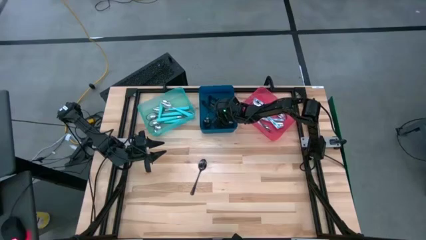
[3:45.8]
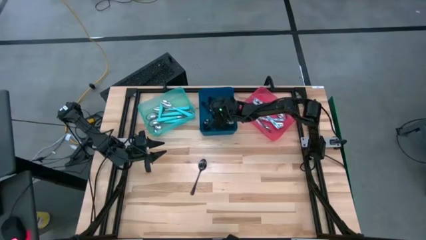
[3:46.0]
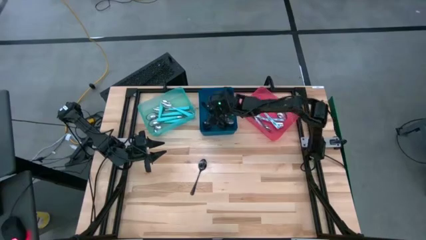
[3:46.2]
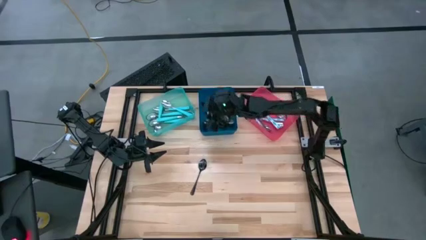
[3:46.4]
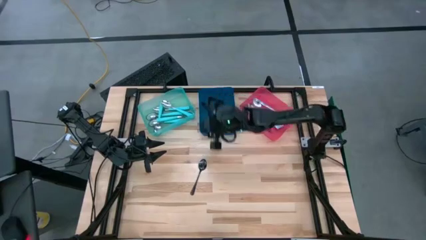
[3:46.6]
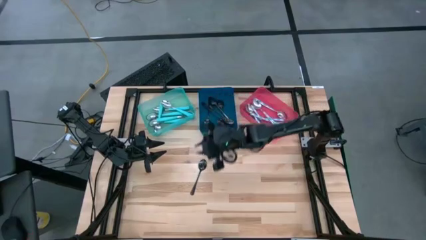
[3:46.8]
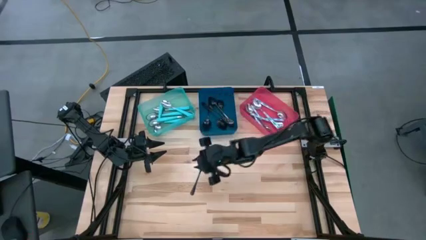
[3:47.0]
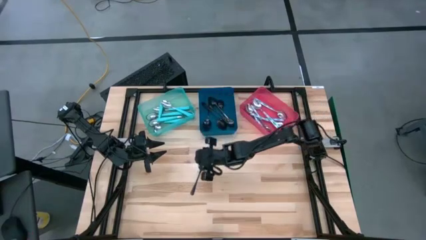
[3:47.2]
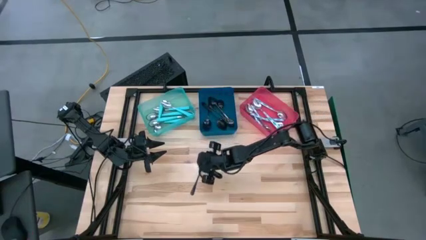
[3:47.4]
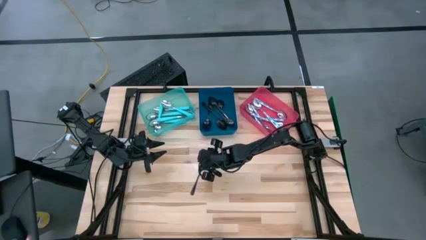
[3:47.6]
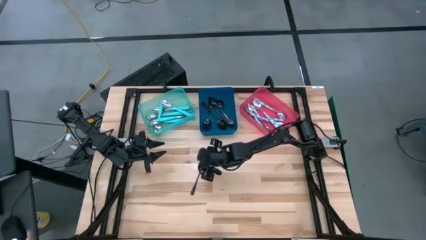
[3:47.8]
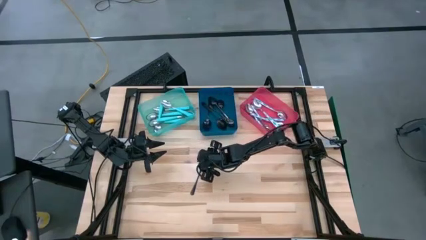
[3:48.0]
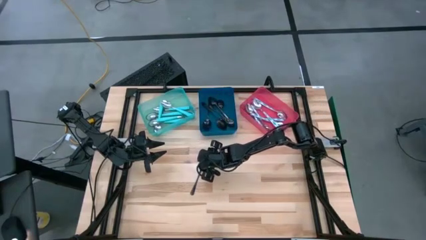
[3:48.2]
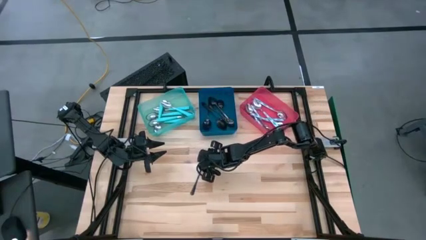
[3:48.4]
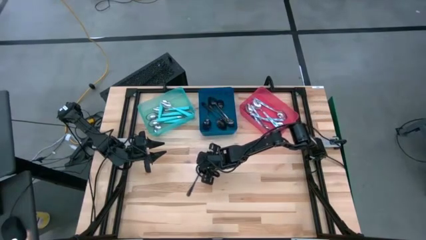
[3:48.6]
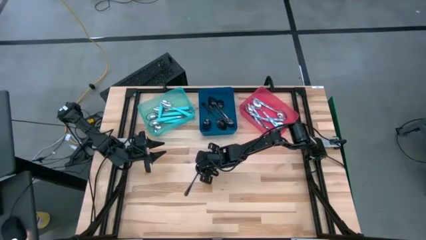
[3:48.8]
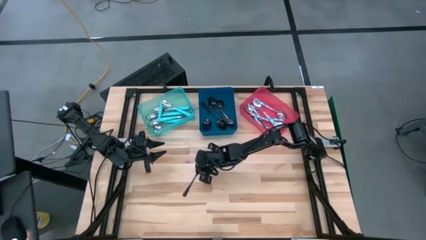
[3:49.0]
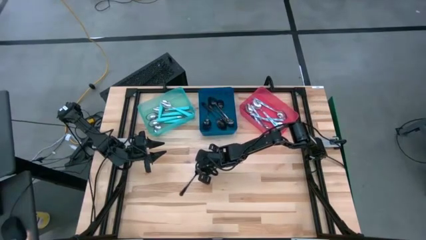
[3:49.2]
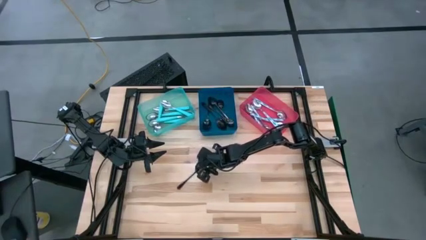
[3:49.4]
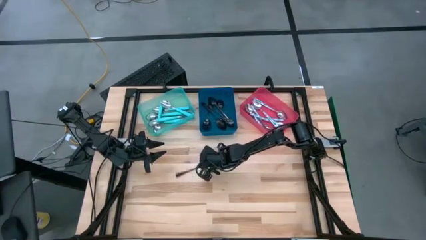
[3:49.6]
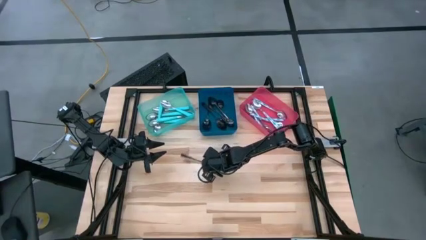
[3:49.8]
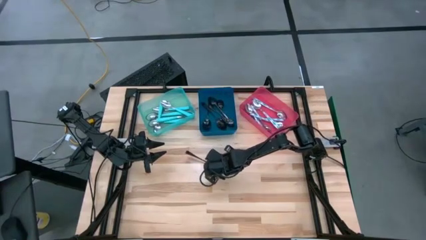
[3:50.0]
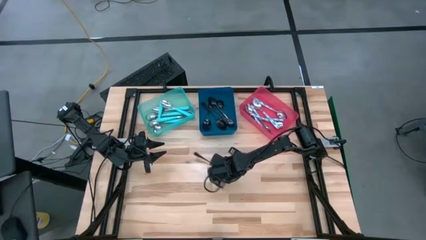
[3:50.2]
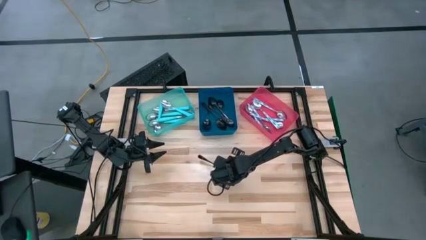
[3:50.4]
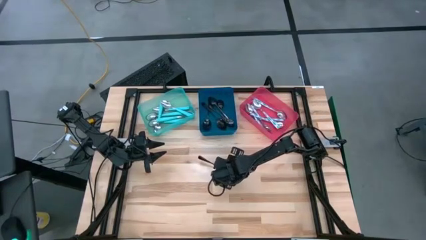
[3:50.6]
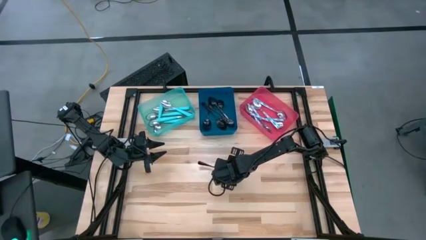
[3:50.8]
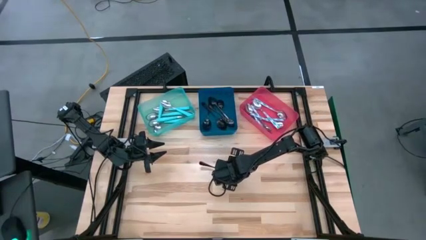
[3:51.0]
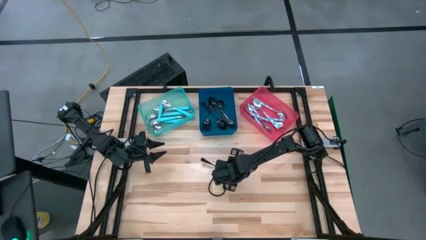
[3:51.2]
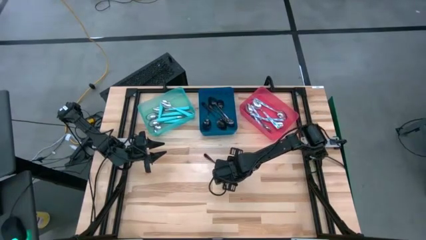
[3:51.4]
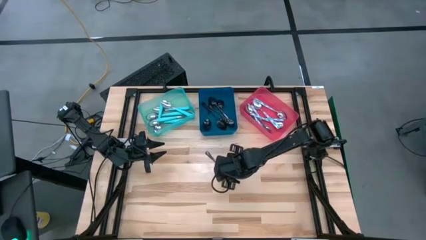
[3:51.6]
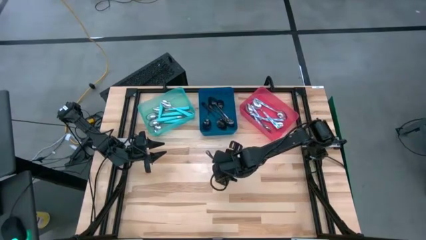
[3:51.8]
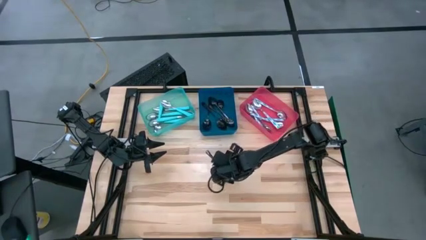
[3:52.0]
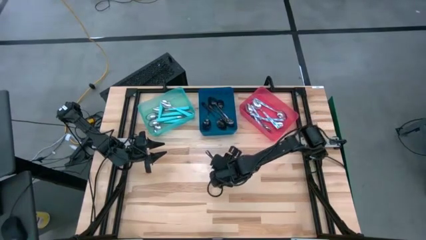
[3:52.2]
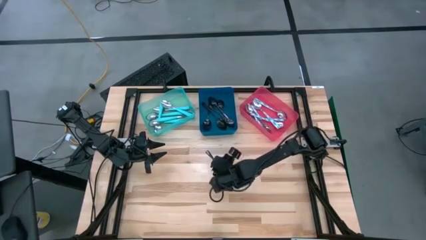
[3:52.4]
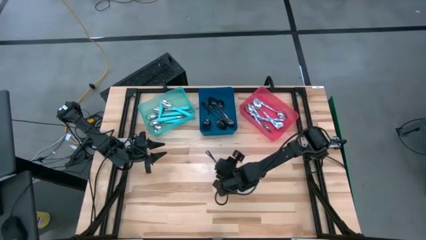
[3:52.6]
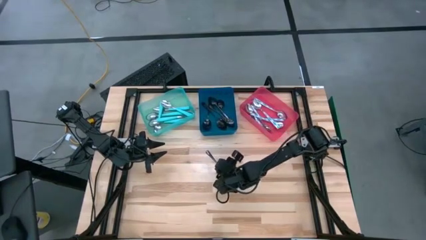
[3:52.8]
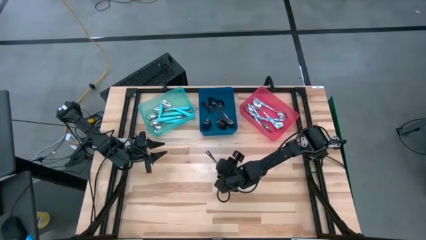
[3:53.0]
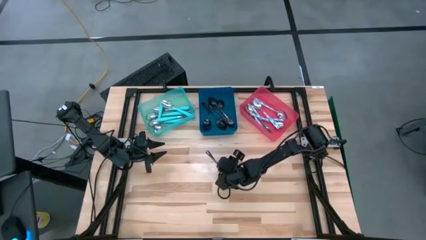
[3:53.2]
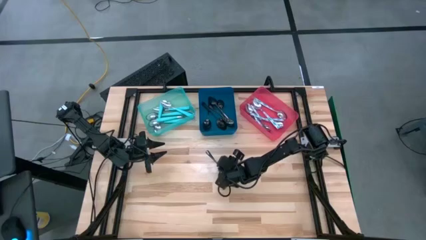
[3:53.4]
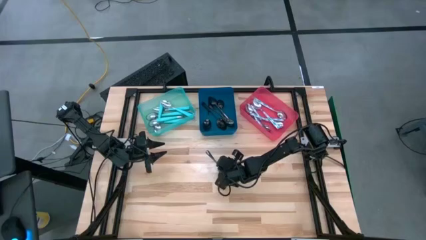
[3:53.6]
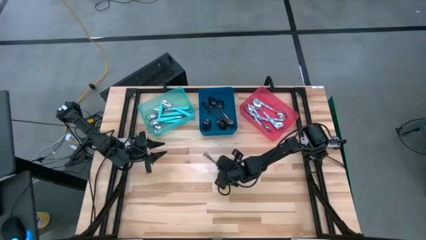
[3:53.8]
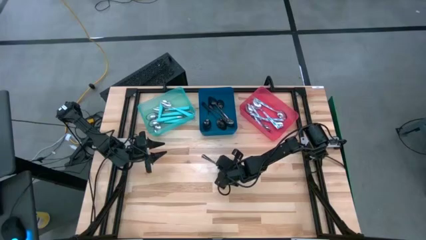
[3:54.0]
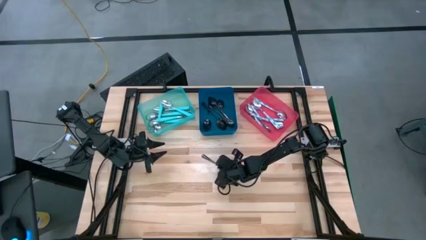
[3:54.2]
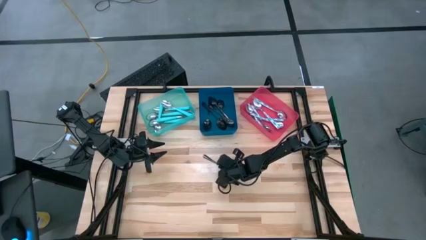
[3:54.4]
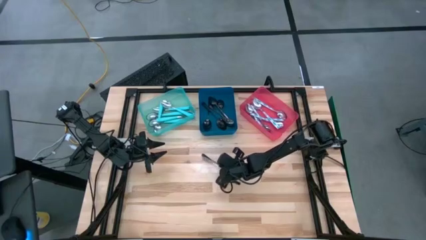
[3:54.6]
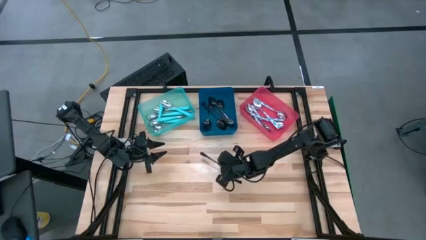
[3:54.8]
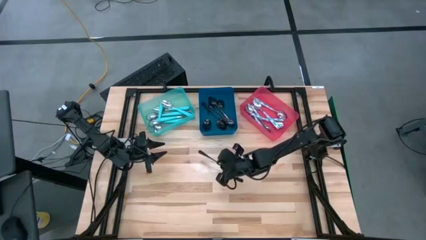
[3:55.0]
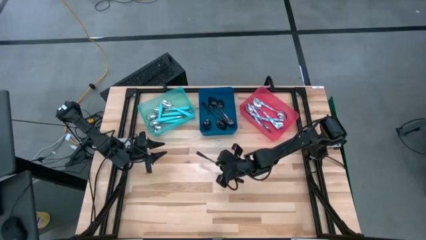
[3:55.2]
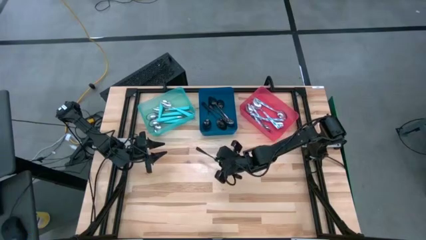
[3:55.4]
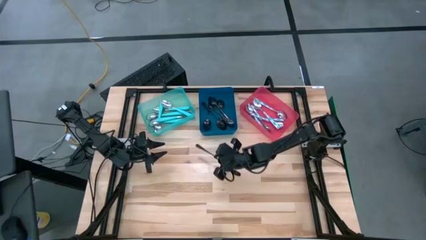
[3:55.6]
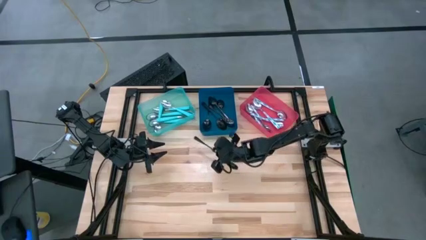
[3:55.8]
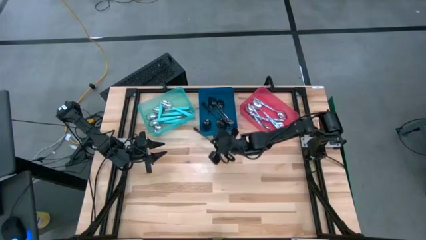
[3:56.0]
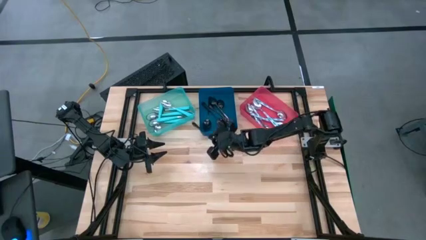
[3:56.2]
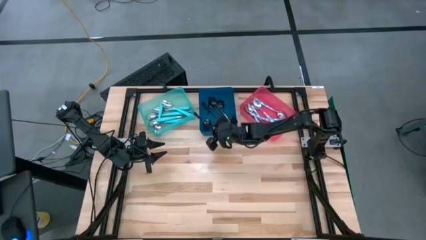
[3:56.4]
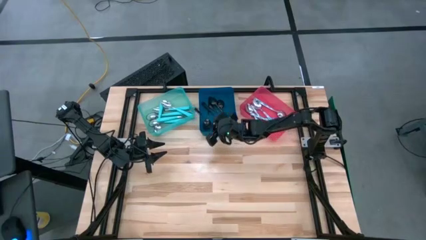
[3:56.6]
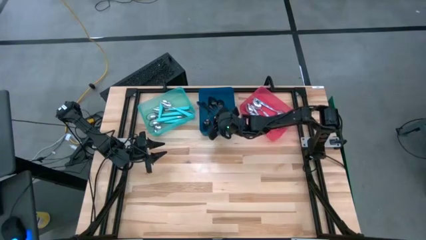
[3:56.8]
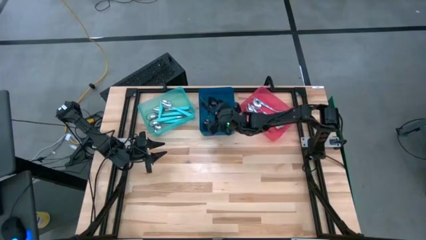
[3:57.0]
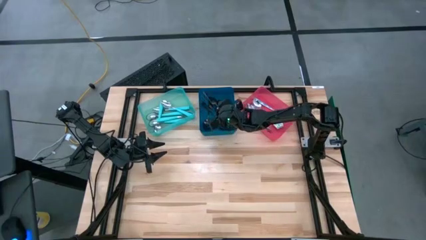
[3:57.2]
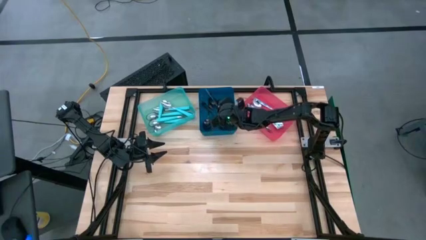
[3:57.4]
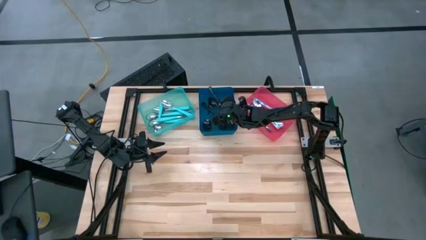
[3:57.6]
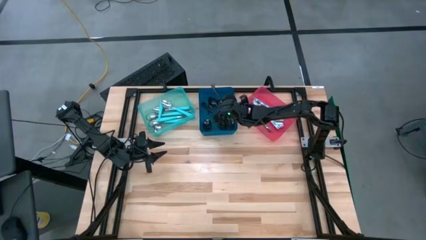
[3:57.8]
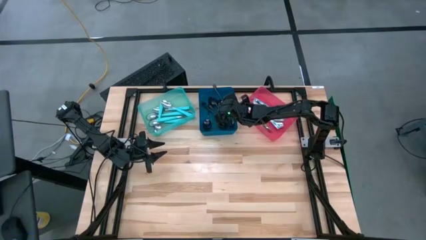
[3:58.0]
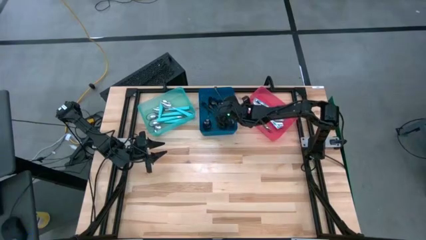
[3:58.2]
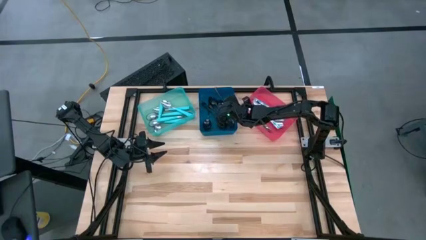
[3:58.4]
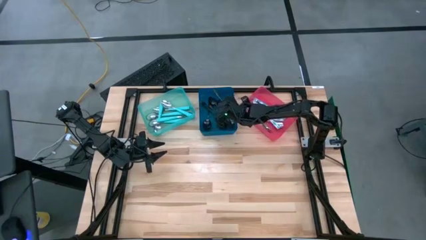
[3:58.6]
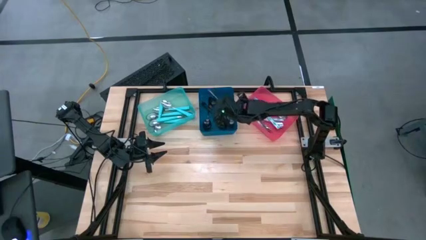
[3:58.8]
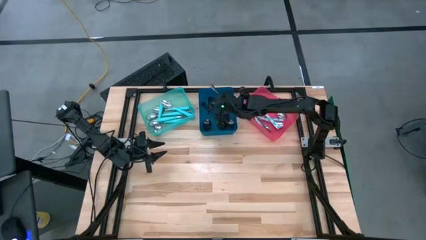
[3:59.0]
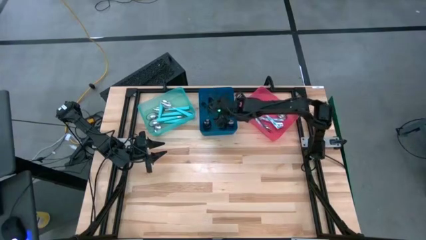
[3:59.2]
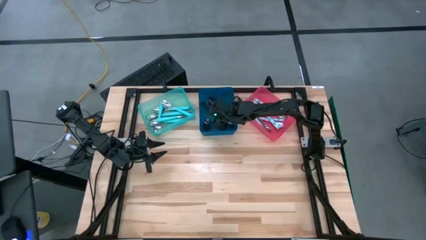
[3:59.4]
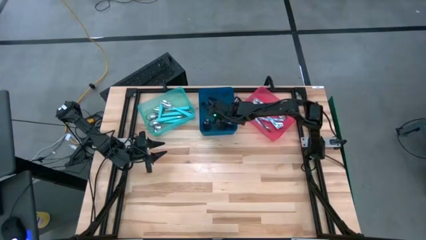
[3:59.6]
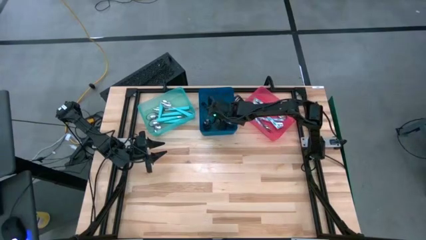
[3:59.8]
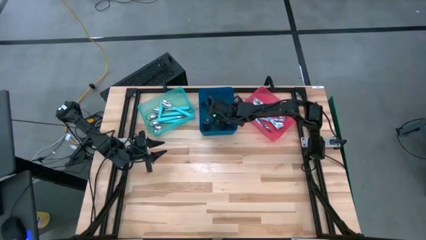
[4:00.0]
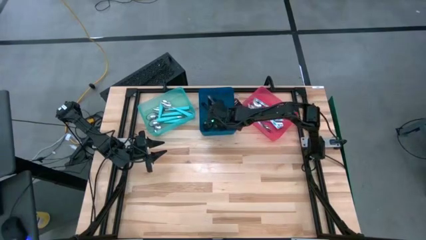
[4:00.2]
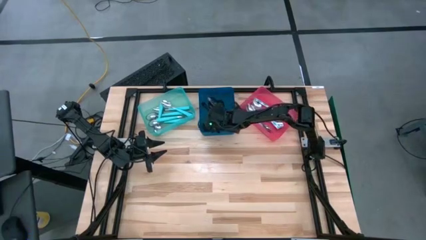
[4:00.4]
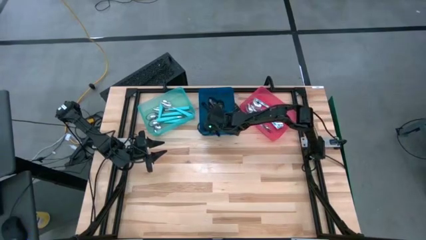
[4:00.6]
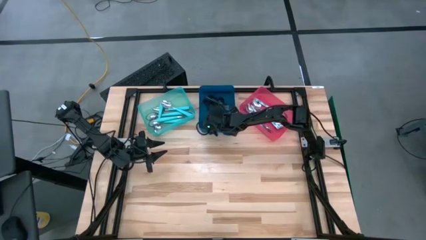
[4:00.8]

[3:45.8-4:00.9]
Task: Sort silverware by color (type)
Put the black spoon into the blue bin
